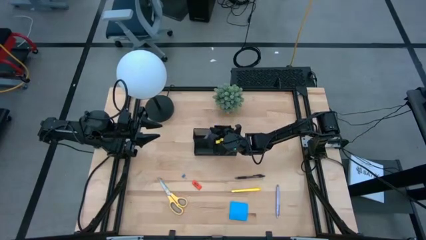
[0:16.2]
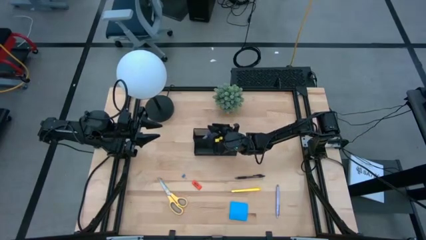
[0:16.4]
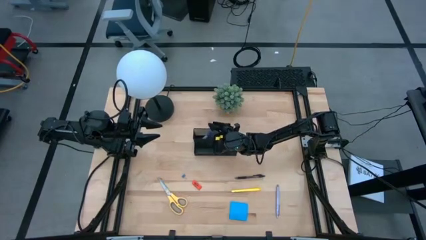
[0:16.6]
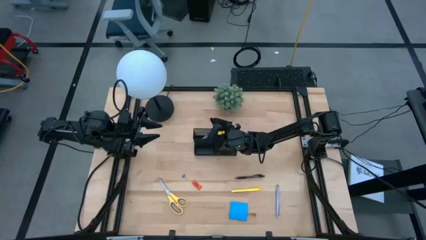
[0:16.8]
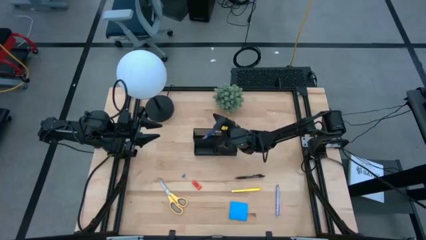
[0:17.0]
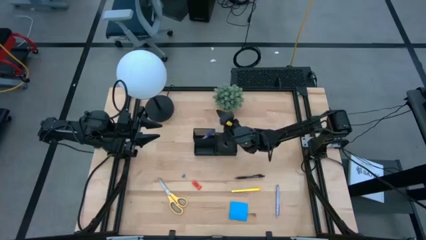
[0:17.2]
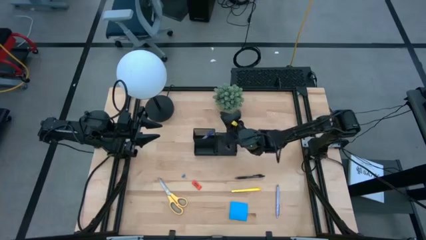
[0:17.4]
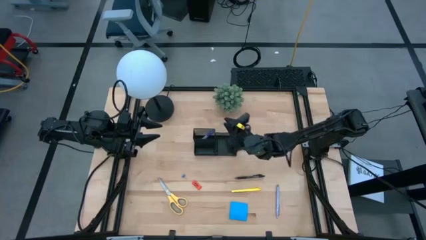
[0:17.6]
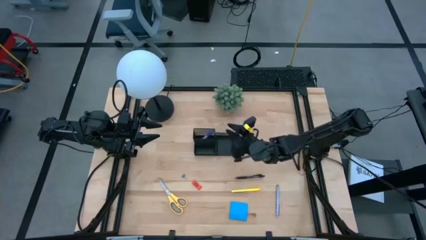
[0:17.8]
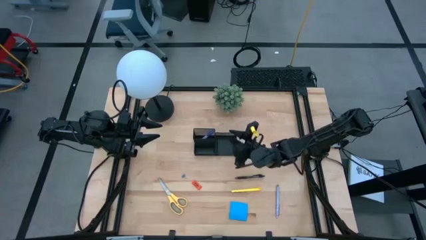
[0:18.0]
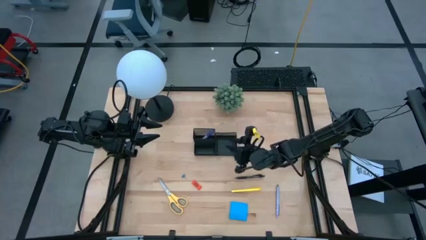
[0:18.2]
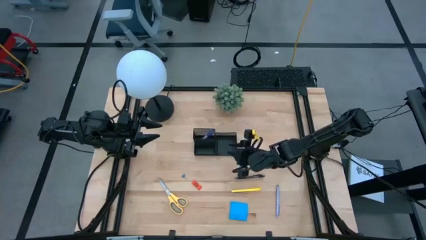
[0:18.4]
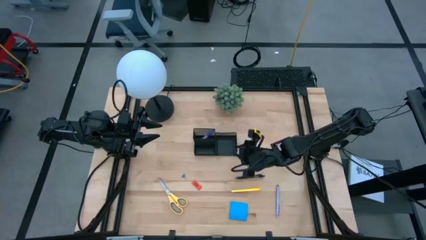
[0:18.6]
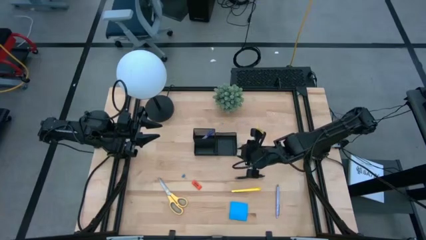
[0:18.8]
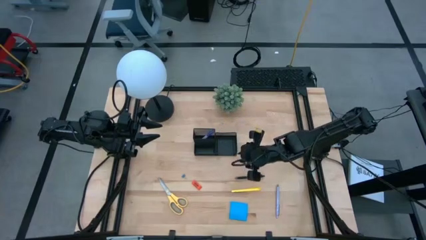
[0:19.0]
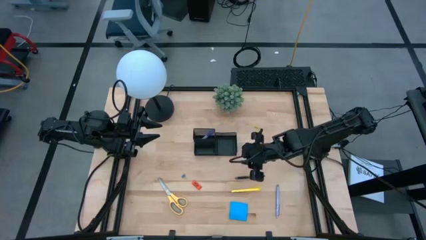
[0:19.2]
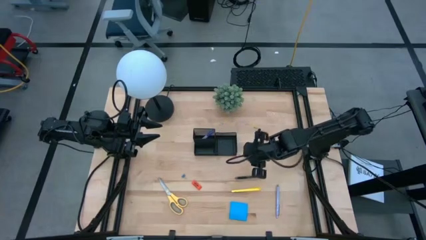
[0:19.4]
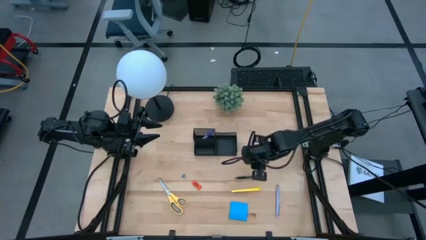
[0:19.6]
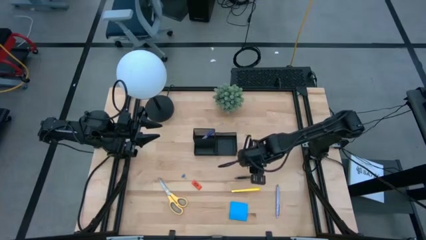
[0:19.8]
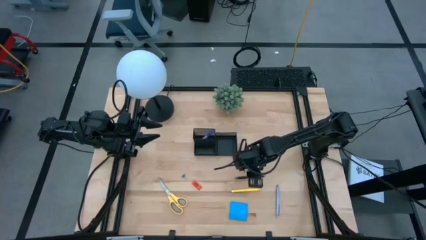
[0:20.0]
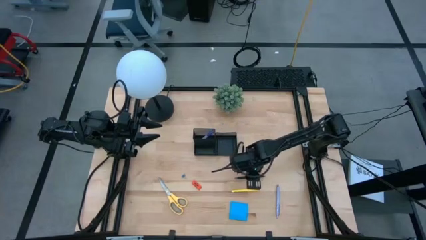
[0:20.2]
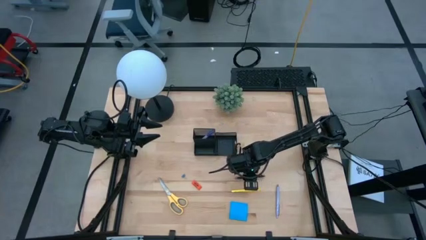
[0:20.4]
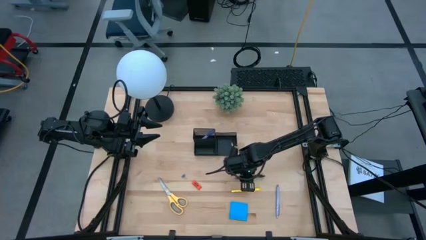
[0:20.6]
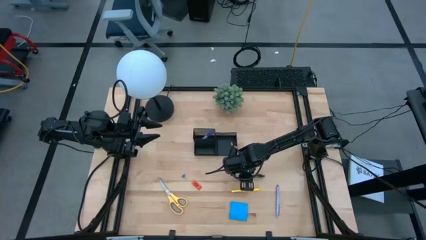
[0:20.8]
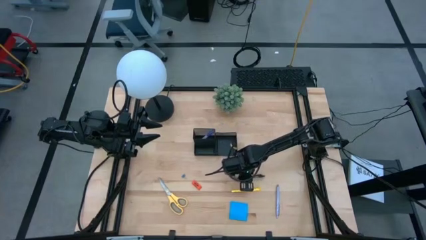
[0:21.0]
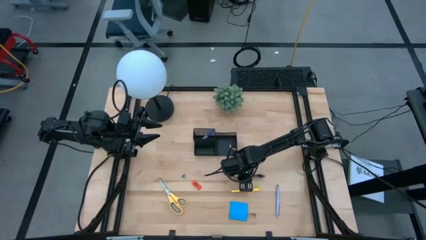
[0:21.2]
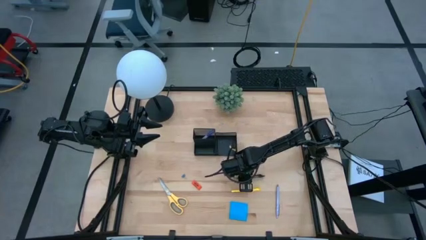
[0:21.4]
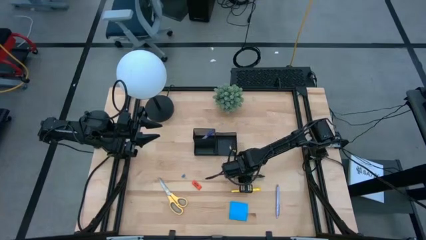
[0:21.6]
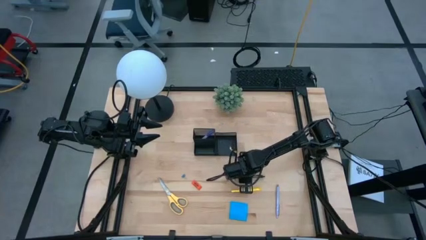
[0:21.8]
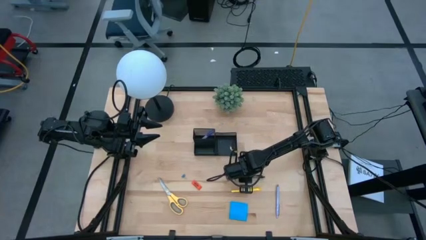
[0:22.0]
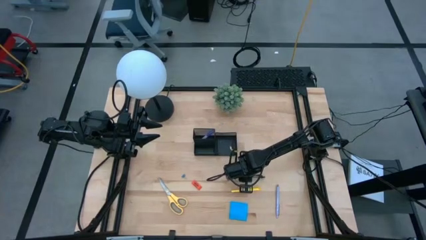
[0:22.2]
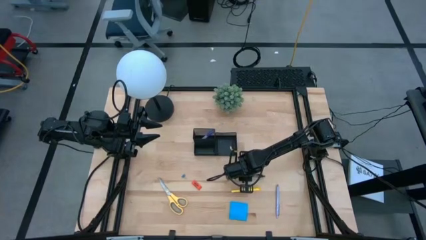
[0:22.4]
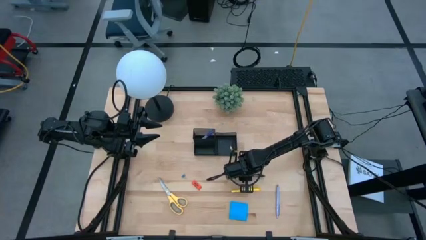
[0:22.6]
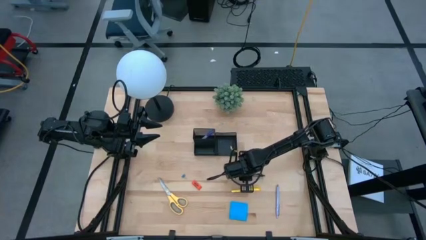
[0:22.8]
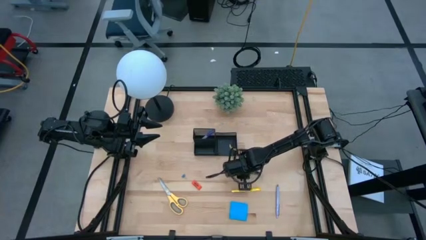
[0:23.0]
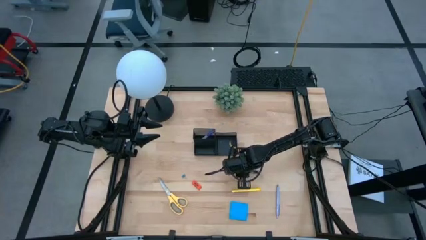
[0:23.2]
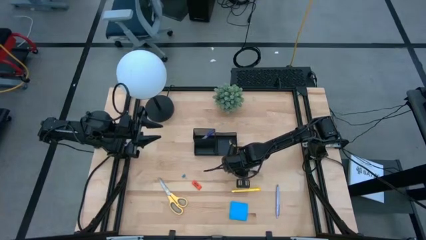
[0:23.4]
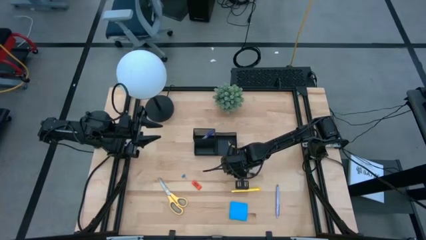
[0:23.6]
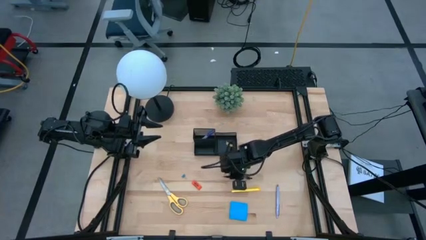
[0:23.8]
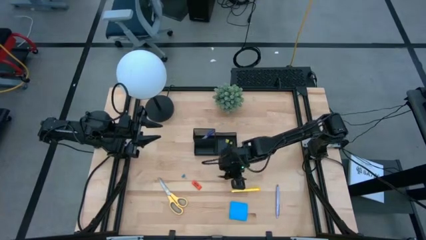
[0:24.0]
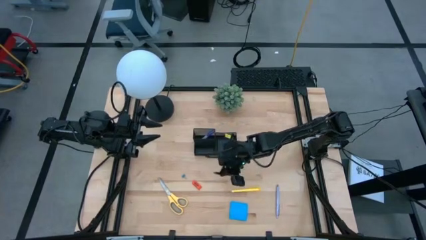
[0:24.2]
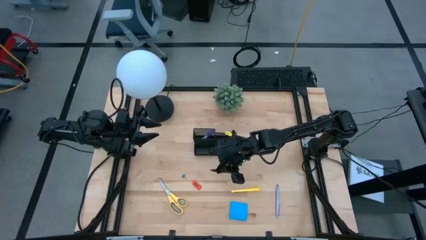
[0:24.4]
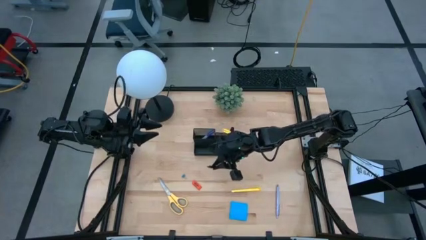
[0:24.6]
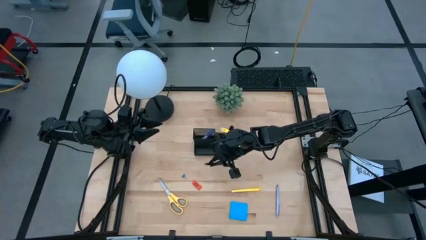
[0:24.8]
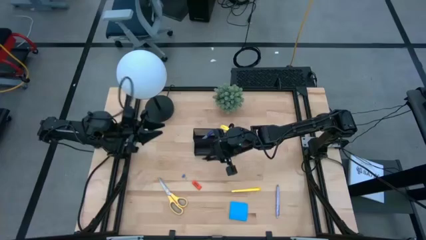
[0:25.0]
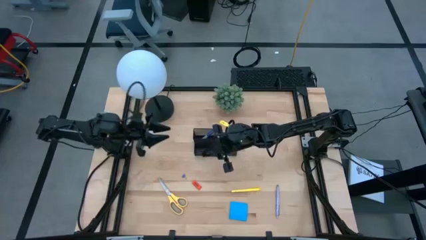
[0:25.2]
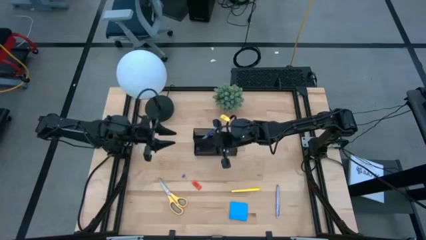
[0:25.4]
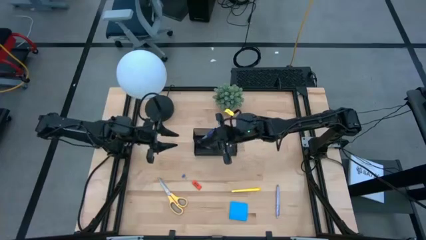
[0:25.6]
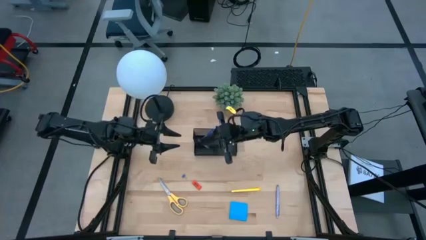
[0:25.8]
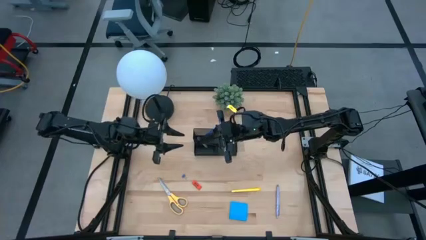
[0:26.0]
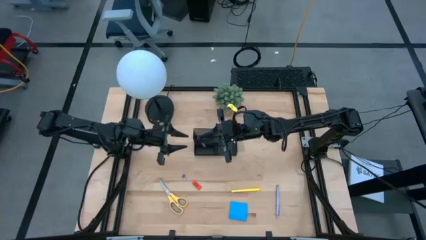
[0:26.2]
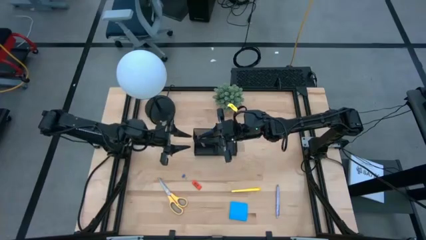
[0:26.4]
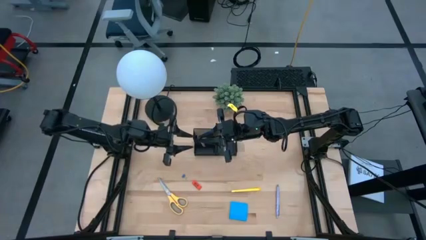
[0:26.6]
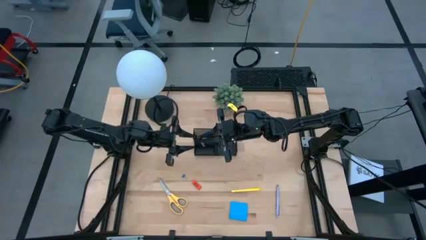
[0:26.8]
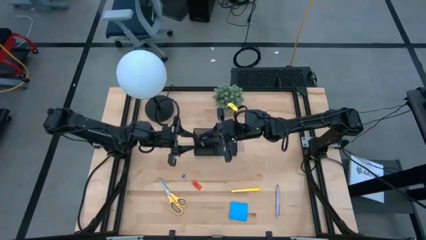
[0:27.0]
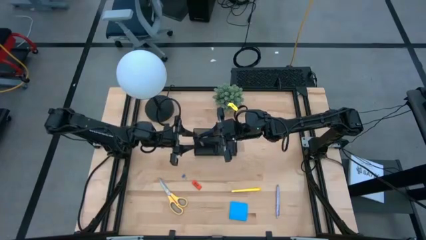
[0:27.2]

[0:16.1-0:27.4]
Task: Pick and place office supplies into organizer
Put the black pen into the desk organizer
